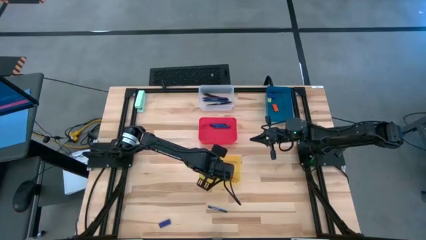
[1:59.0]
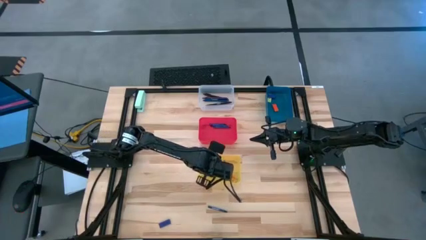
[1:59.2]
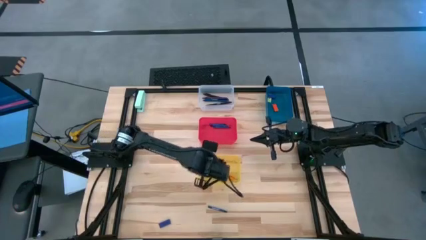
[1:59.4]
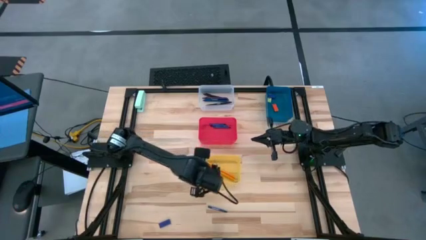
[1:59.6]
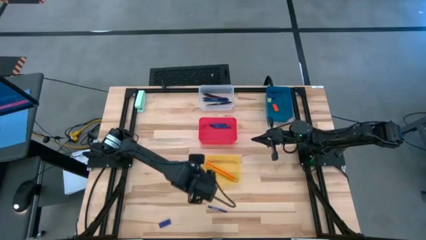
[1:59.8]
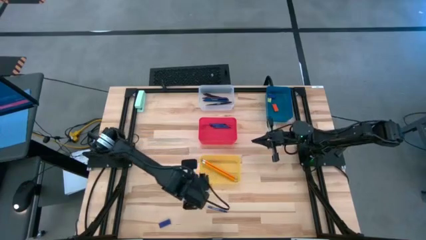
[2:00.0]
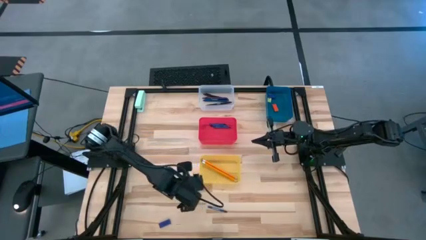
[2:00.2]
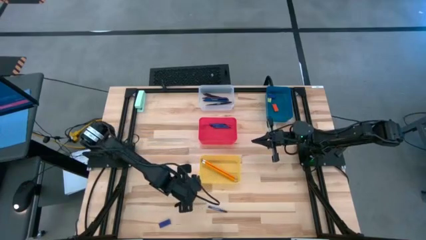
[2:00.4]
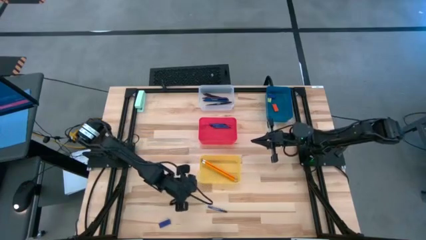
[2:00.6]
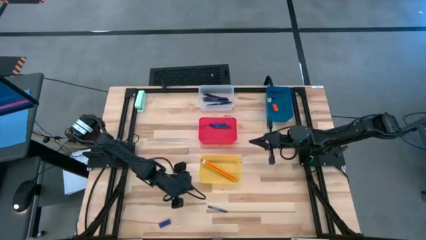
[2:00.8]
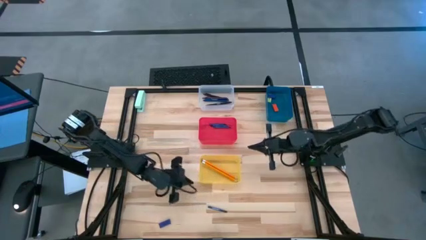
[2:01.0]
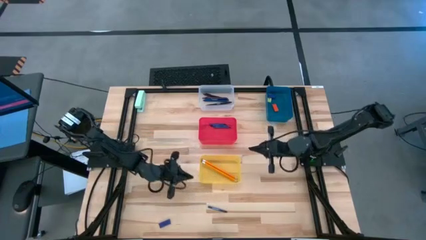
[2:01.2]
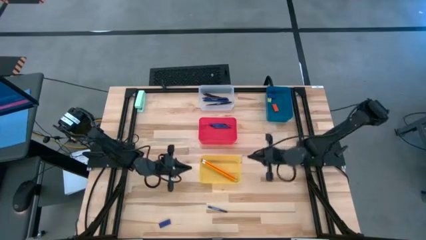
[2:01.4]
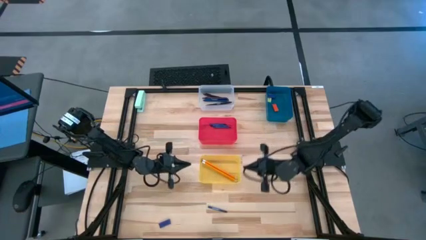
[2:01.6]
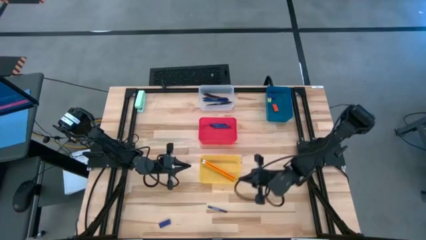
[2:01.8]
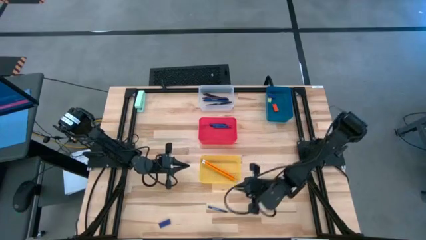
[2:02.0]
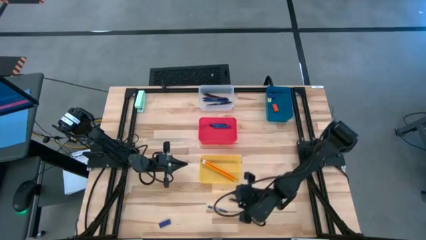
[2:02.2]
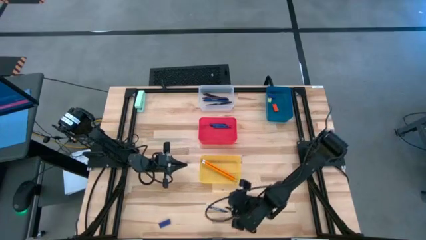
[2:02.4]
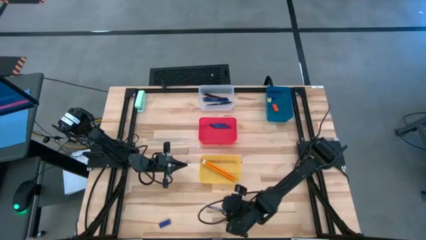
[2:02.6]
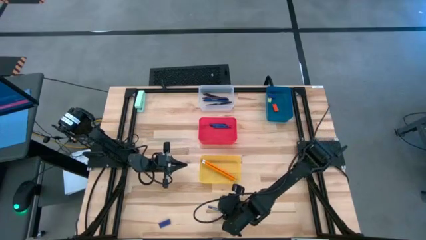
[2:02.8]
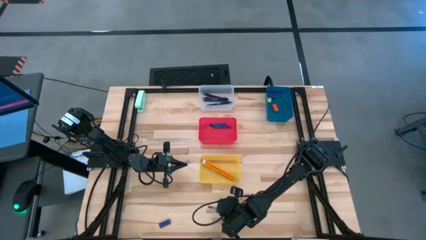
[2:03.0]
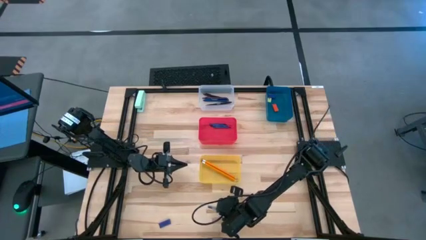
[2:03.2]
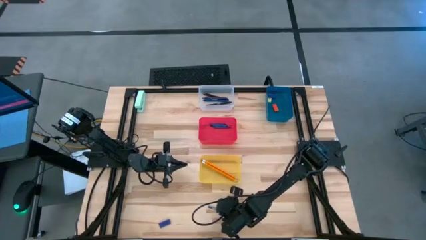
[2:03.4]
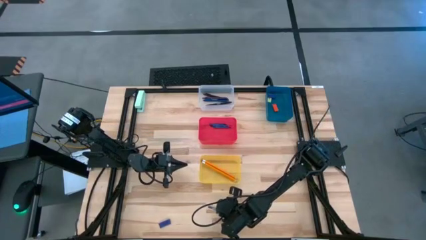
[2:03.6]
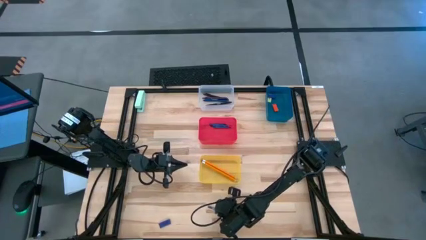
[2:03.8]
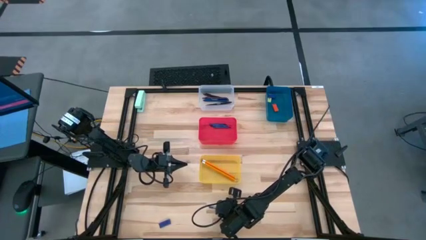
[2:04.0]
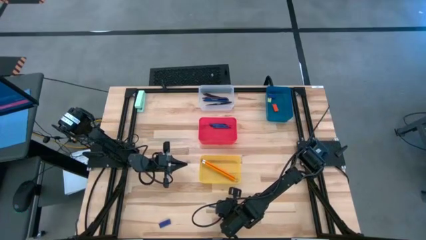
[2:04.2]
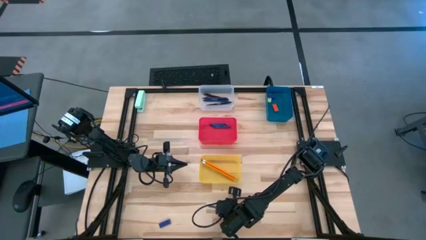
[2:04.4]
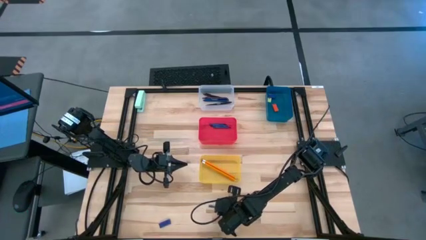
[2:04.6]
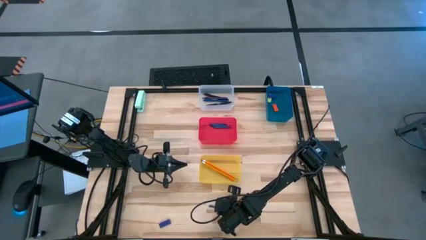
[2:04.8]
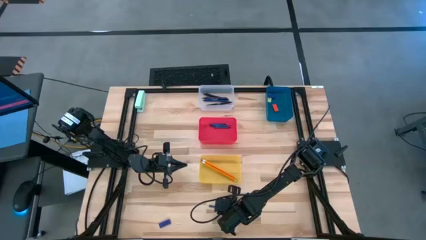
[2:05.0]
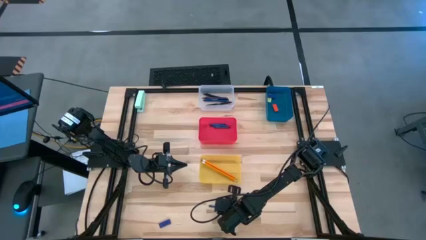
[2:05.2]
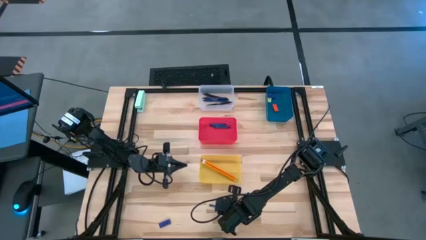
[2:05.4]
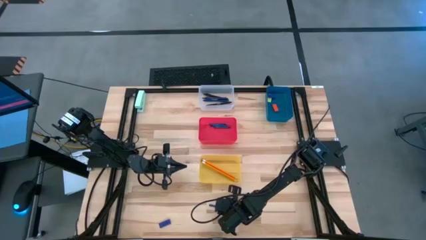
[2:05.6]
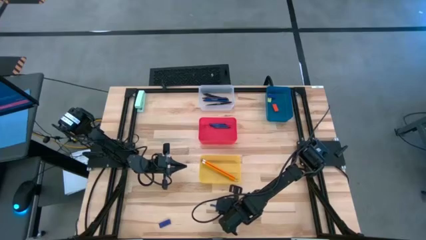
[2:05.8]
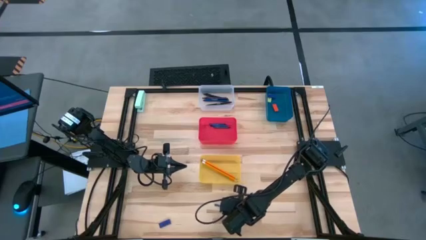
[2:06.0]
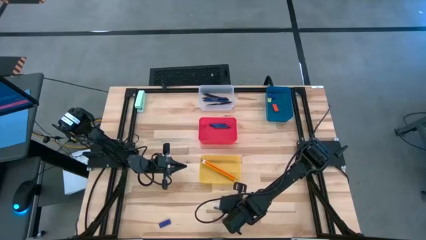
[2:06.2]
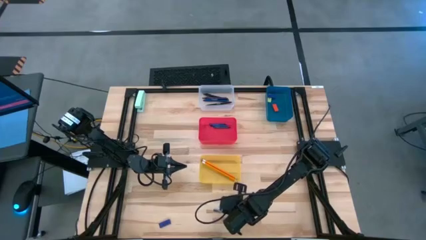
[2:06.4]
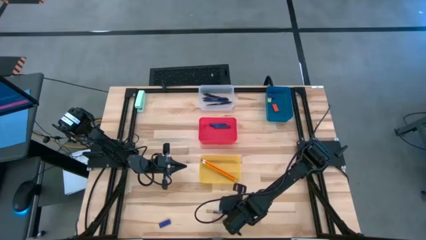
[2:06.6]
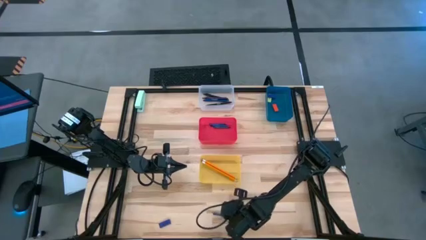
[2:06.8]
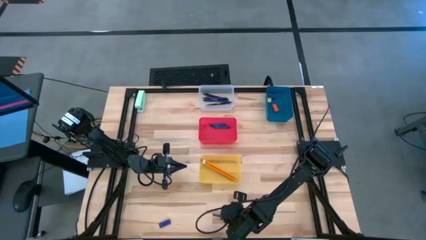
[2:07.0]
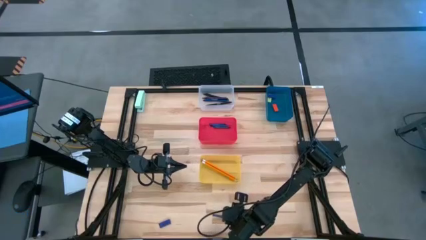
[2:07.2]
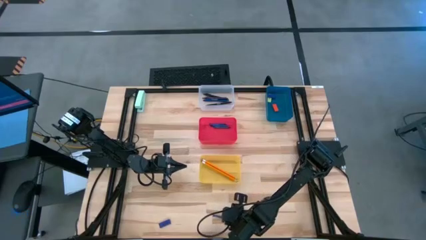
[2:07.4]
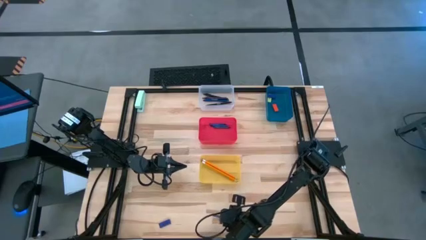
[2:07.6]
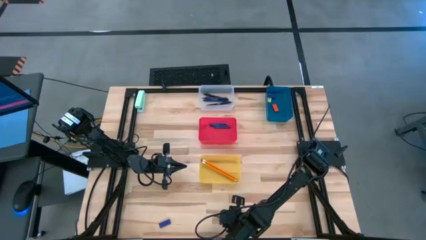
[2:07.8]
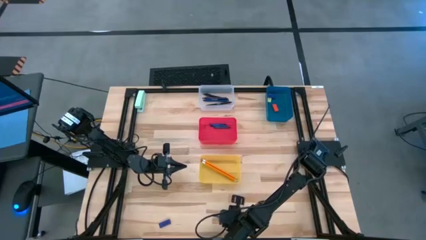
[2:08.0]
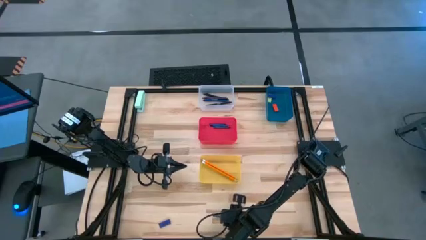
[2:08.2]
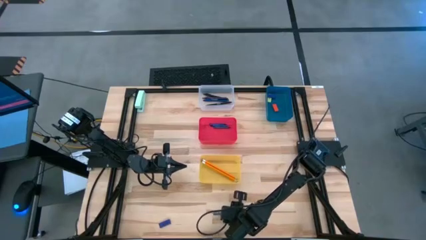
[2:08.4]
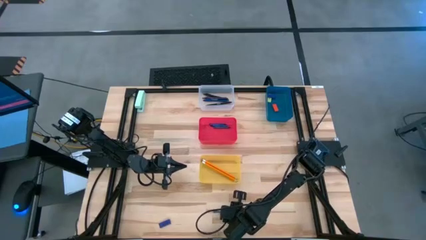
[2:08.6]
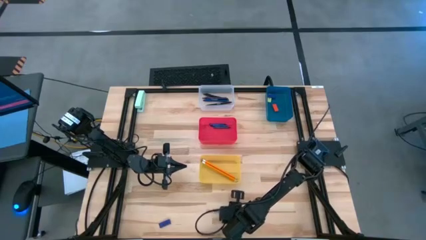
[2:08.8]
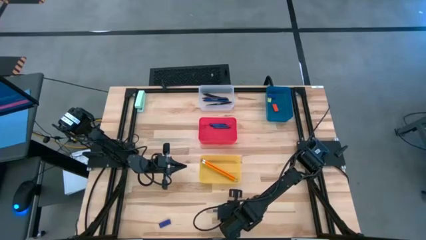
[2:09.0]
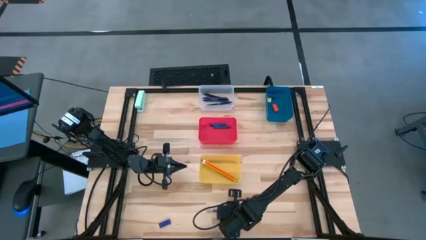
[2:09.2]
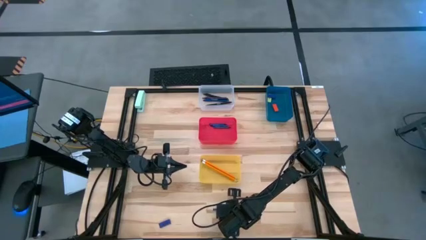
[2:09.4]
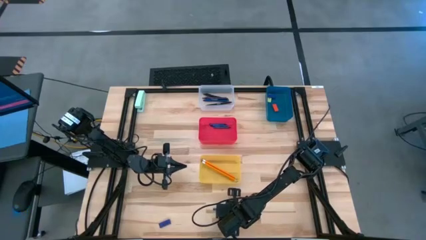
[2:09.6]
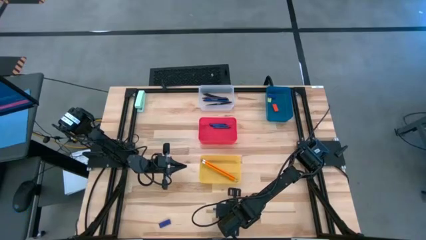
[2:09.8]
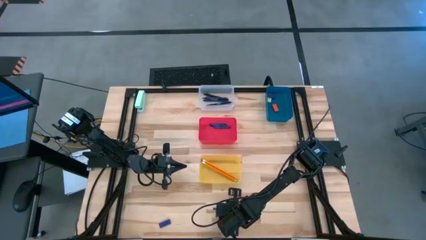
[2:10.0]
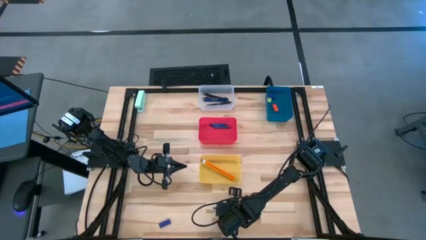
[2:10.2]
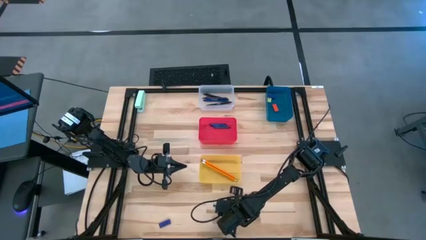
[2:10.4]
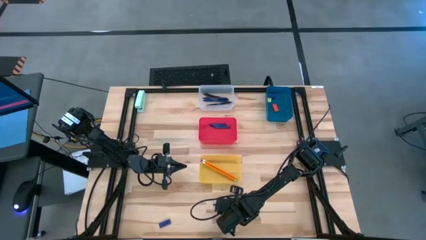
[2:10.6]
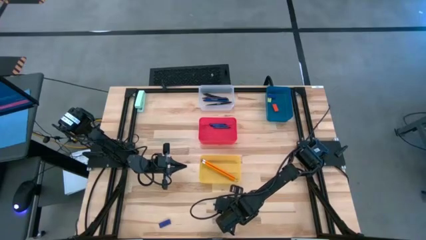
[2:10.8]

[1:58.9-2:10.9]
Task: Sort crayons/erasers/pens/pencils in bins
Put the blue crayon into the red bin

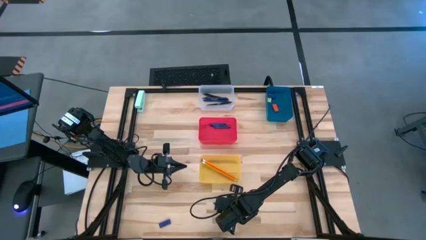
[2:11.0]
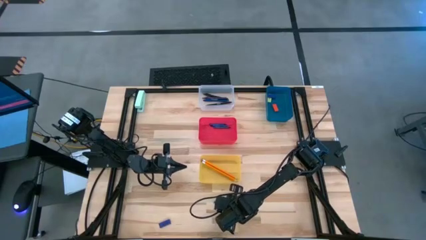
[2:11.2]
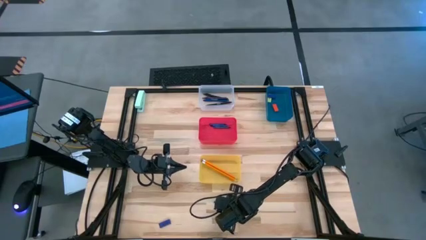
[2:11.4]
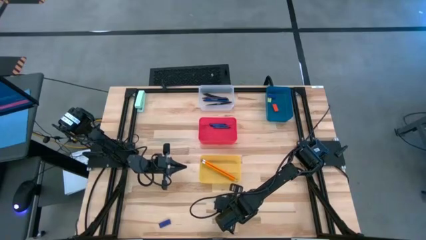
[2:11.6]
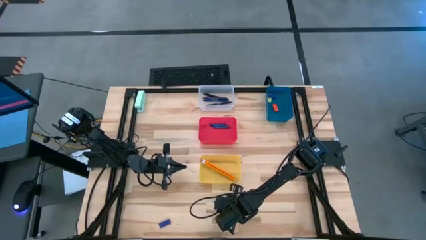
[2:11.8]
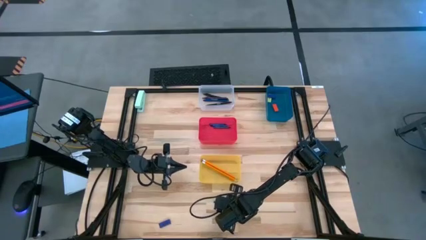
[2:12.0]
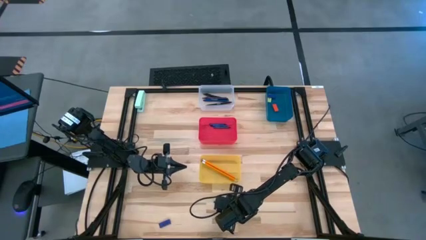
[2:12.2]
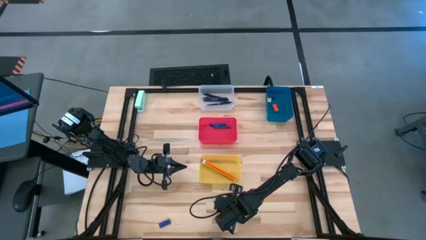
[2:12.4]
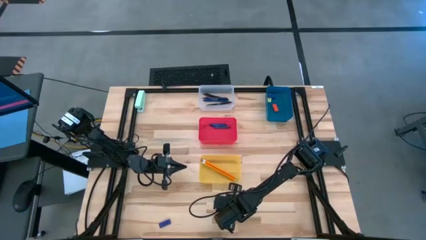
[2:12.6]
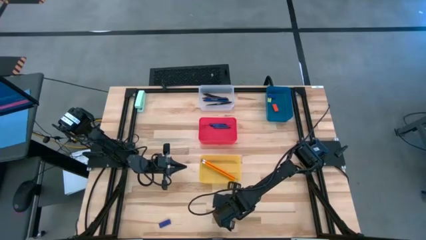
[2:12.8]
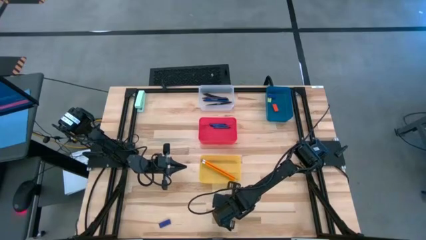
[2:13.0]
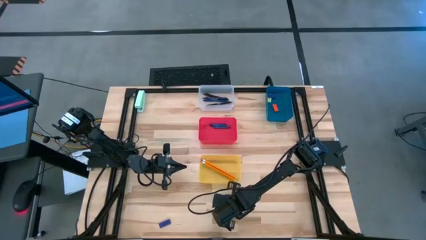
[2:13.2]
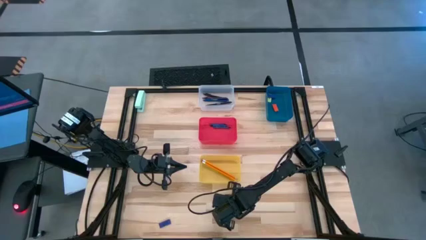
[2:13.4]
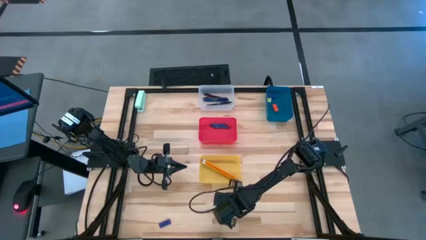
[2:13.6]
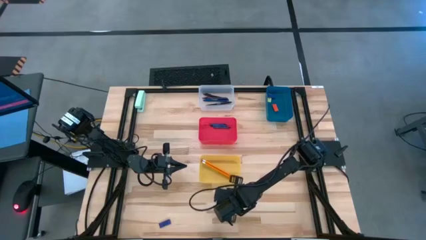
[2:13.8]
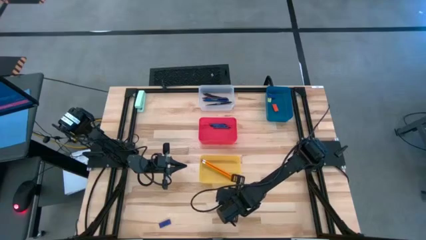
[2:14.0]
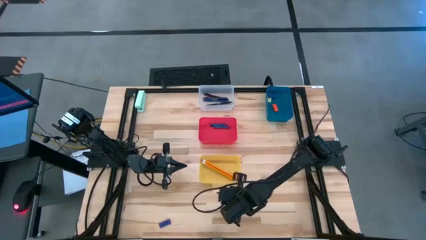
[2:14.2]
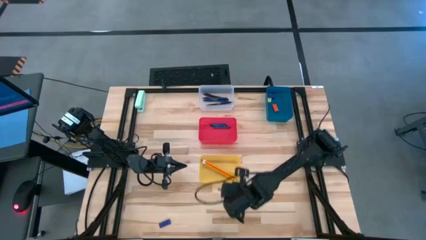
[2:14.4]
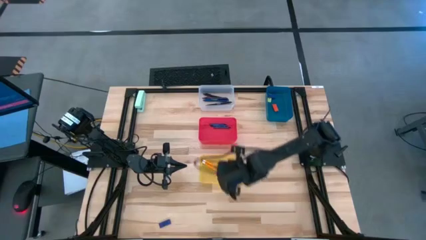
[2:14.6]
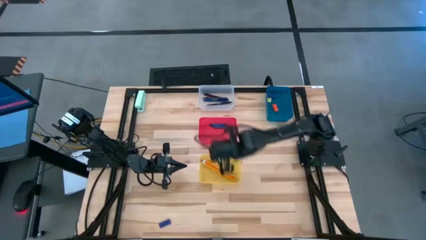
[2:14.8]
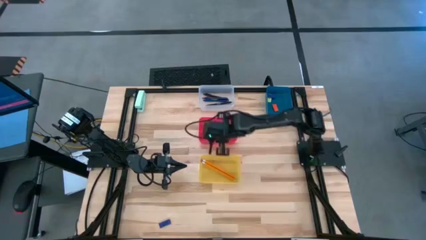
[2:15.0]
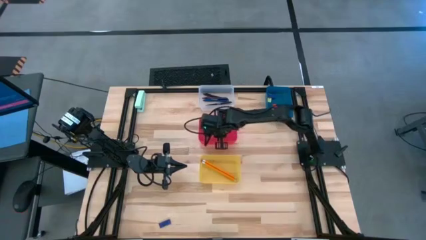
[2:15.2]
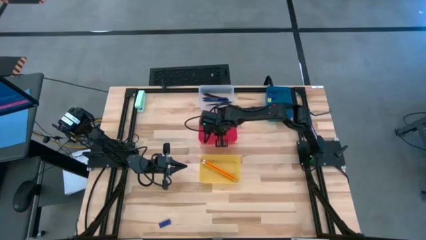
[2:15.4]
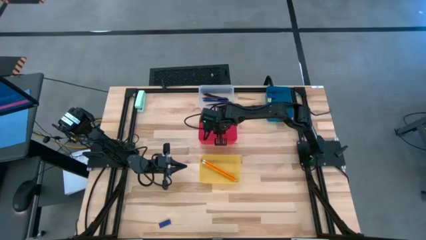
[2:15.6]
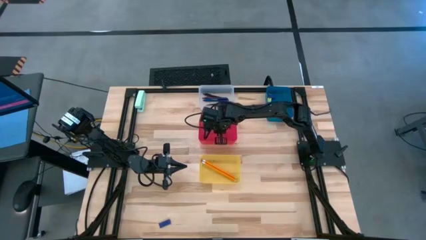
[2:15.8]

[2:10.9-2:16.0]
Put the blue crayon into the red bin
